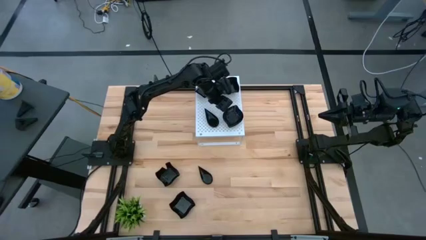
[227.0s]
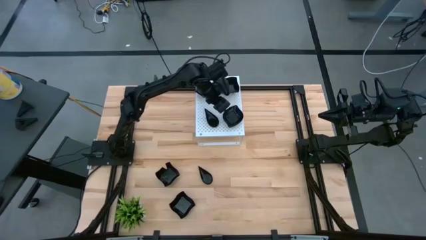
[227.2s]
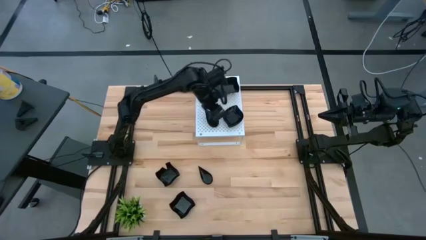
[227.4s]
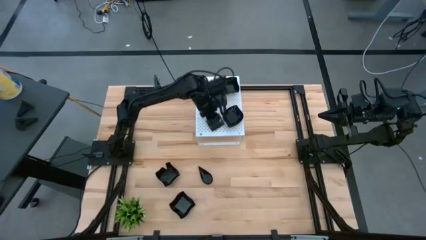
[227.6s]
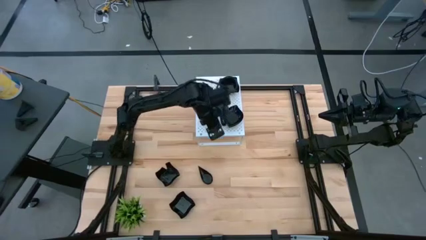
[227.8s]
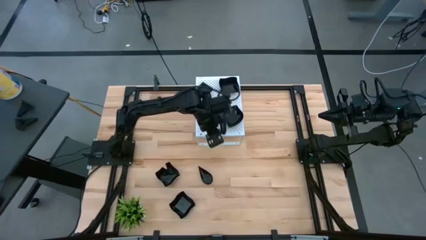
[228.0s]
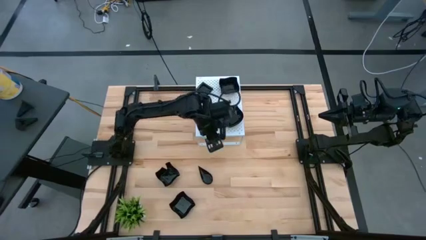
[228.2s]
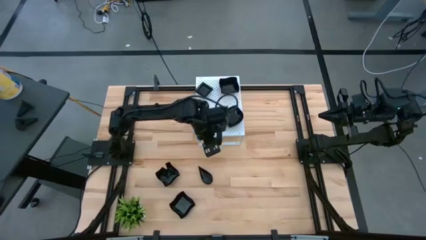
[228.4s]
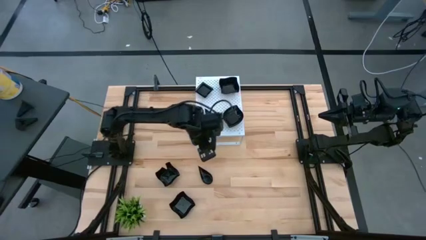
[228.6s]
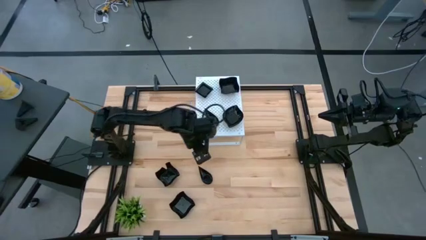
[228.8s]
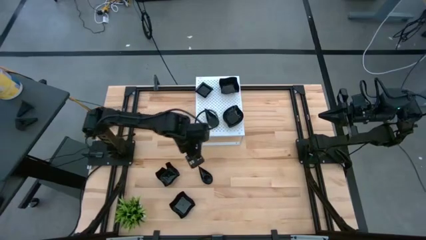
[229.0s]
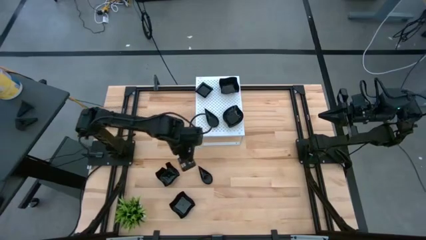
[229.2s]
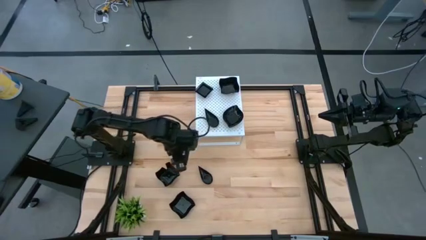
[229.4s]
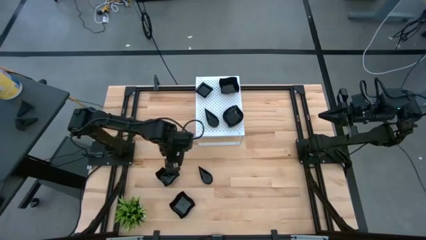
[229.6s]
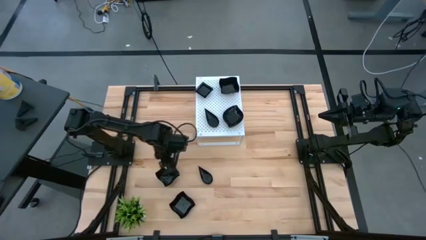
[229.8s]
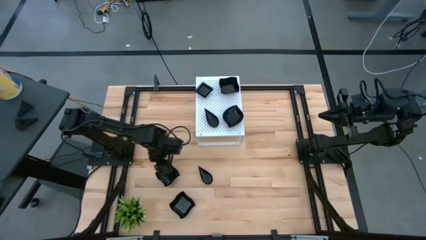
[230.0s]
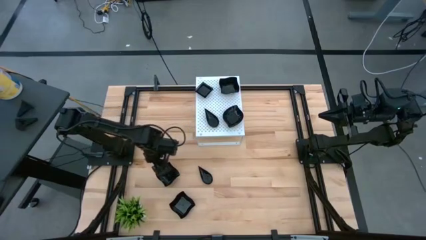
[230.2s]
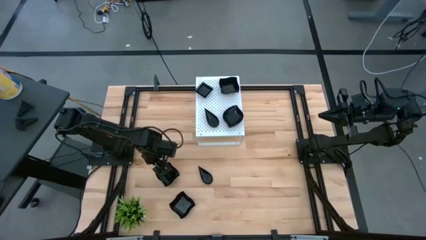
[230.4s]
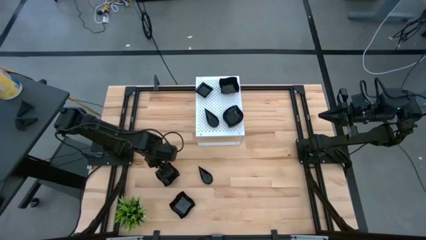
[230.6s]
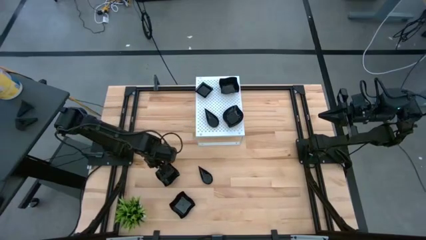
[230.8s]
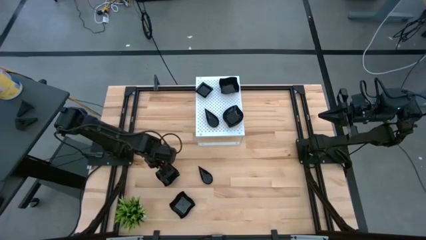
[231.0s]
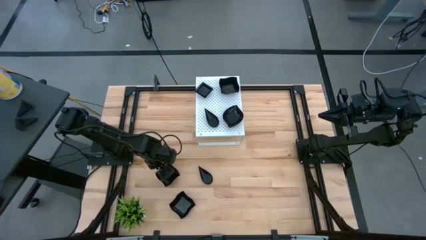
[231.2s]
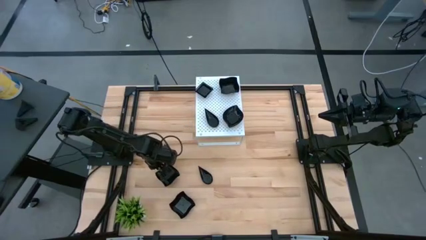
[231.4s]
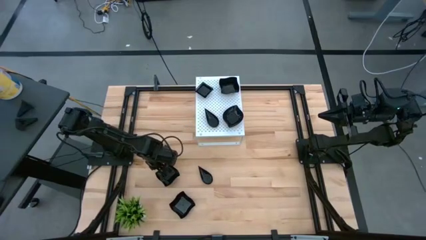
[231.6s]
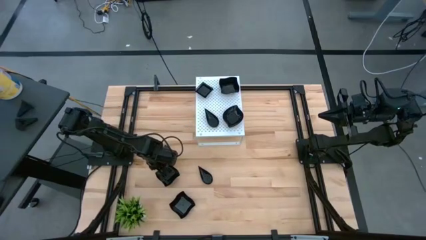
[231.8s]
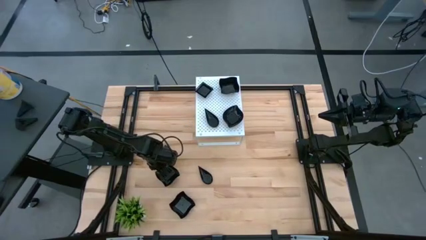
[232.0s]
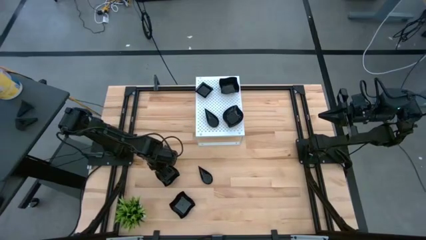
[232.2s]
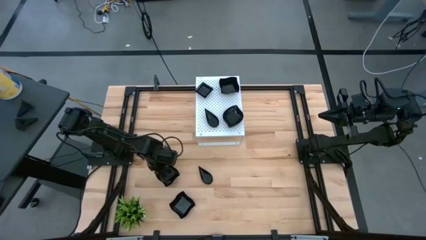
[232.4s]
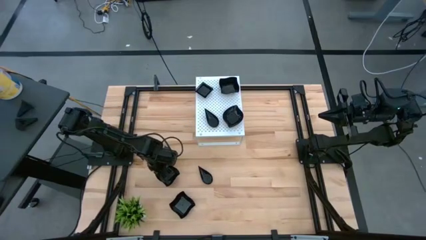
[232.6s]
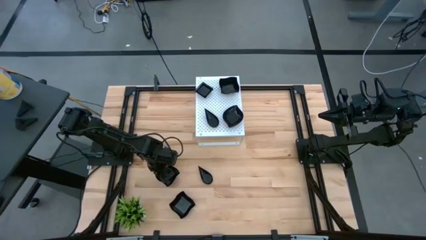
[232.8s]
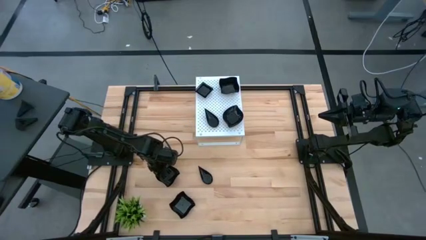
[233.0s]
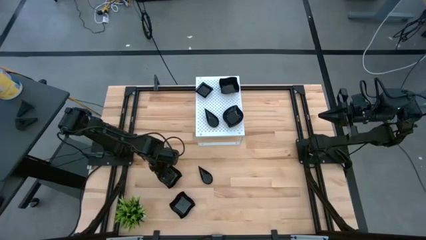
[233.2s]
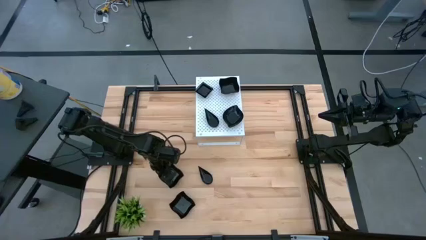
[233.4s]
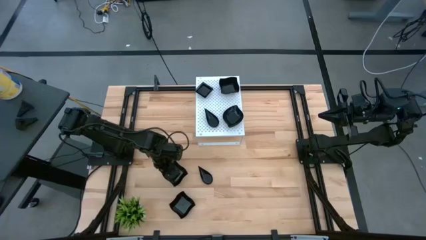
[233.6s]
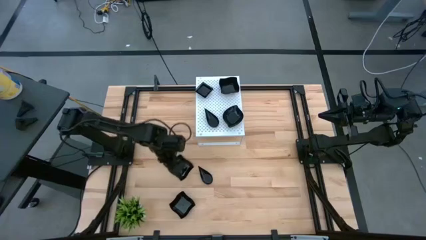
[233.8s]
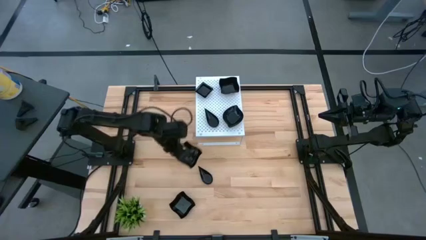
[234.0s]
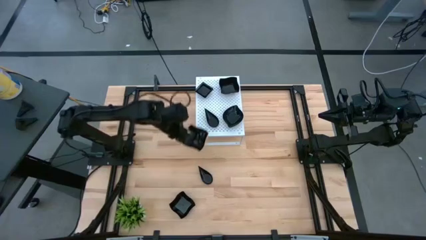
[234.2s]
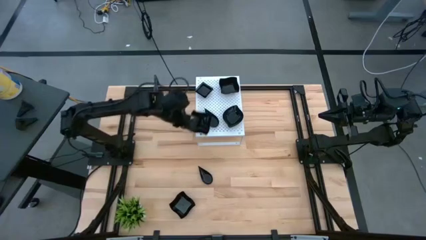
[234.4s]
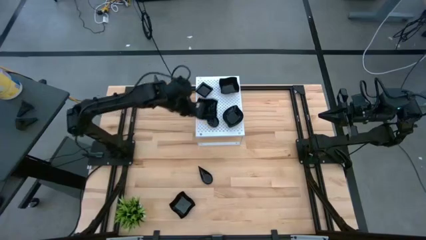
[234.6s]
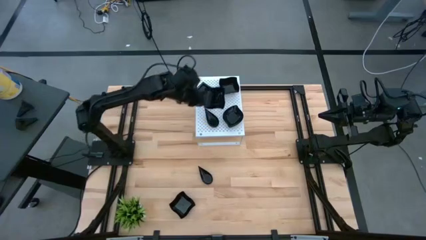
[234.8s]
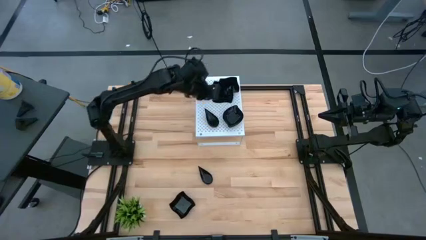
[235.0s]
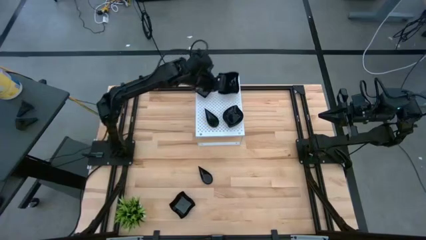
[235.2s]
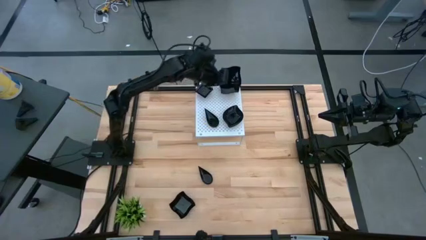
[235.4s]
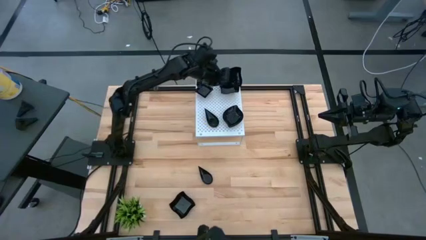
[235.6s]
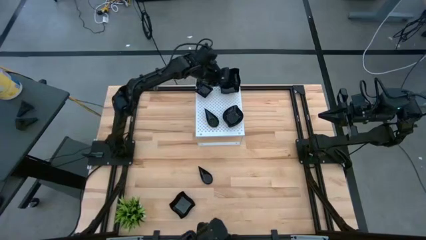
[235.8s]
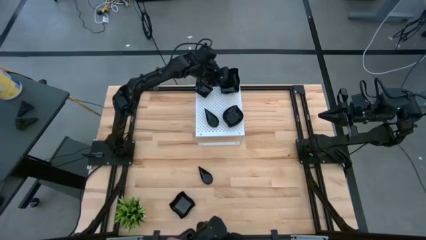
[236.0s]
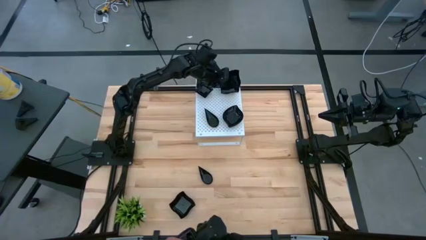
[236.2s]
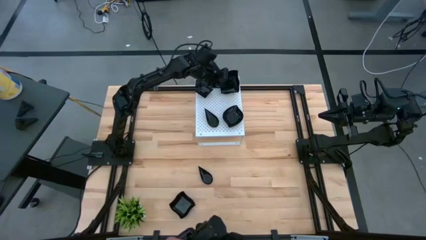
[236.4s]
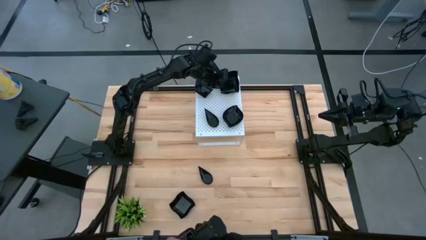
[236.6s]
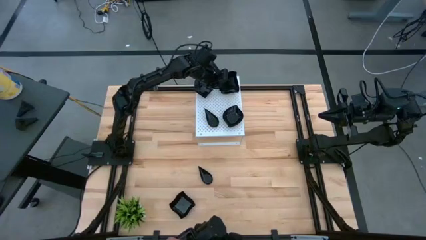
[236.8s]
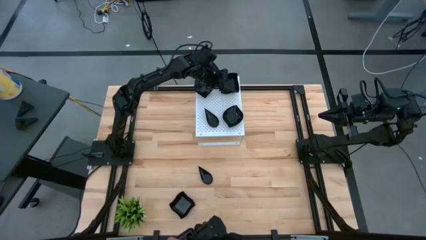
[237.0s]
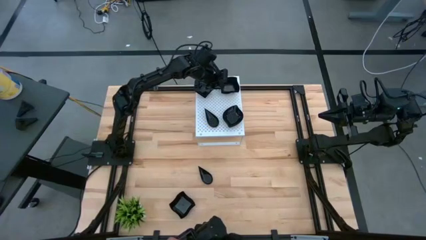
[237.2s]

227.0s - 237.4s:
Task: Pick & Place Mini shaped plates
Stack the distorted square plate on top of the distorted square plate on the shelf
